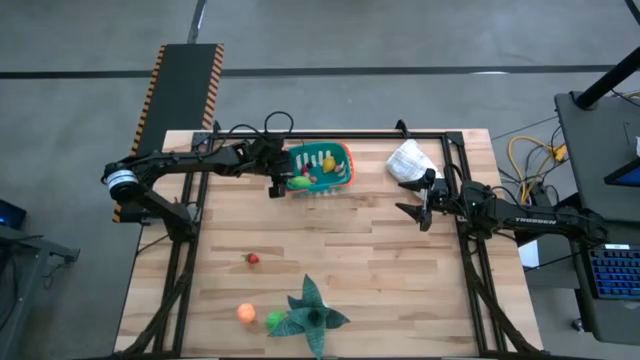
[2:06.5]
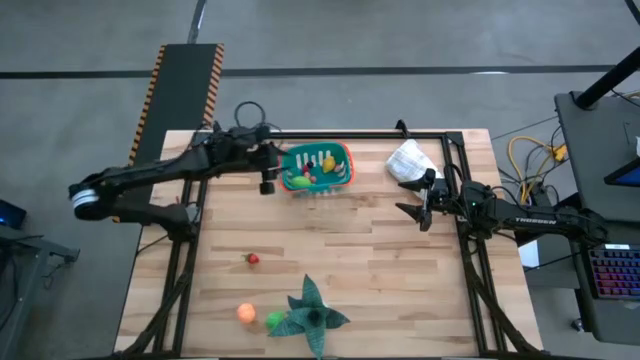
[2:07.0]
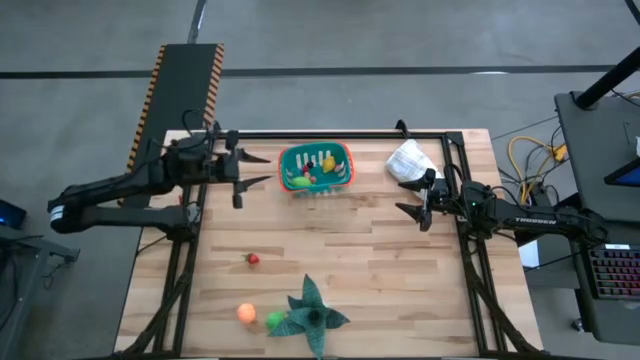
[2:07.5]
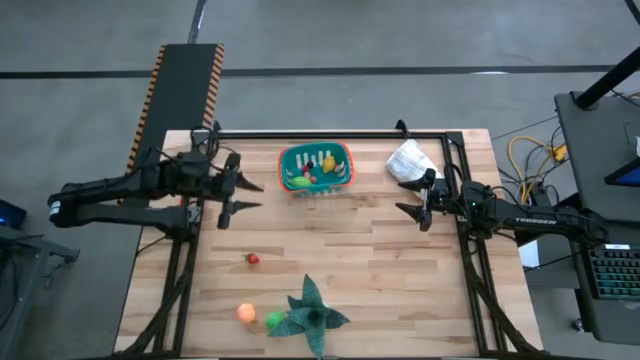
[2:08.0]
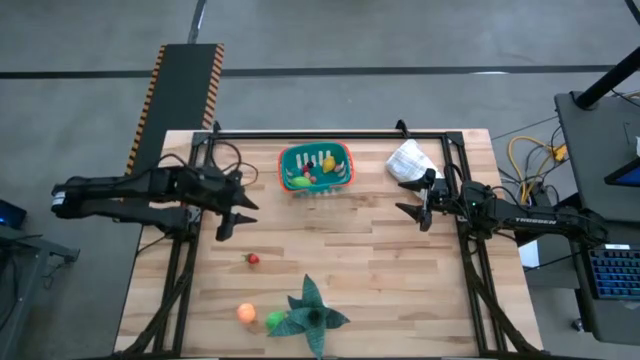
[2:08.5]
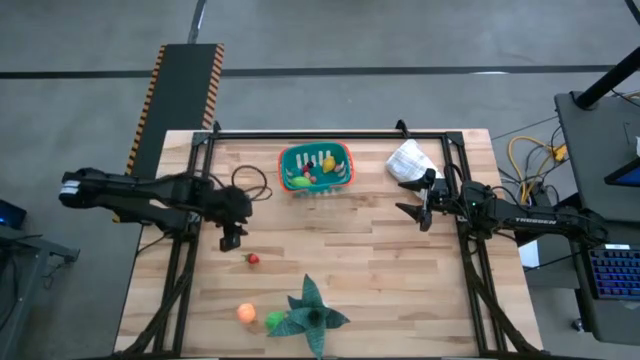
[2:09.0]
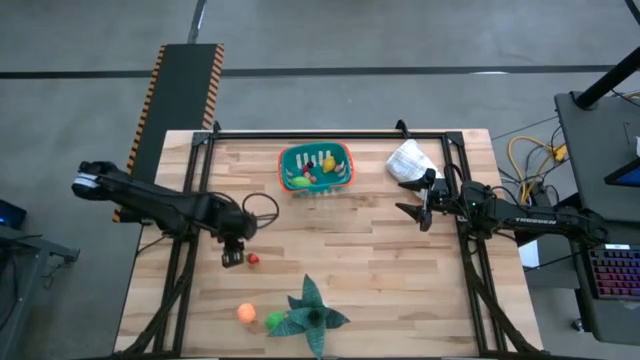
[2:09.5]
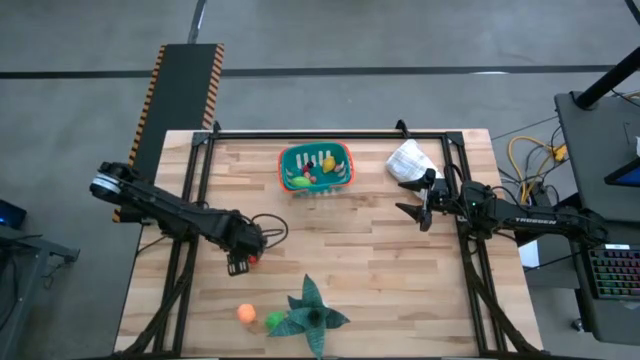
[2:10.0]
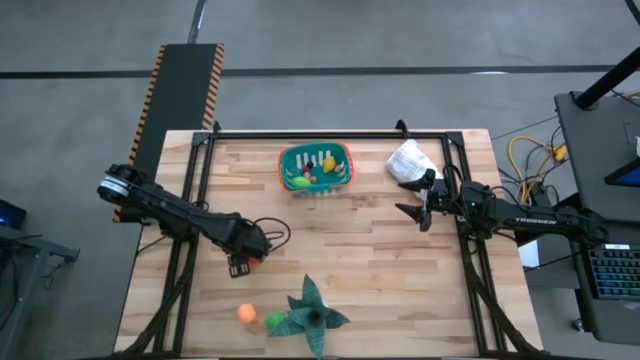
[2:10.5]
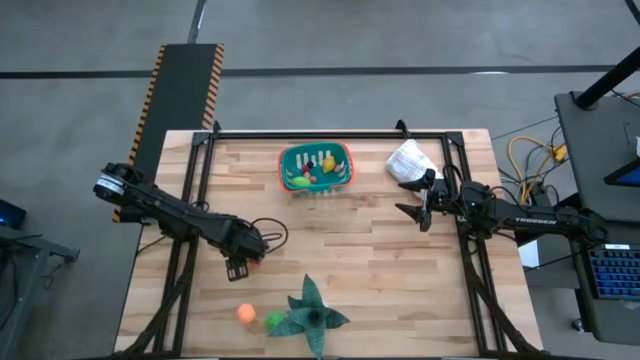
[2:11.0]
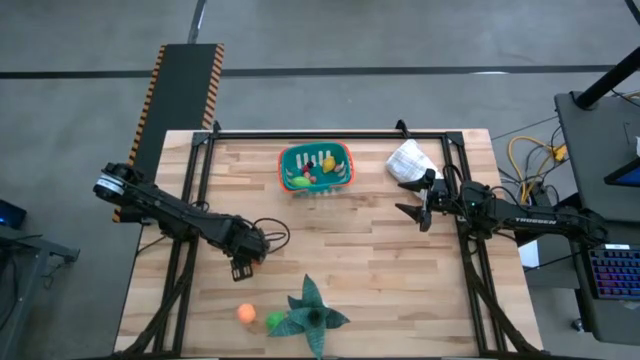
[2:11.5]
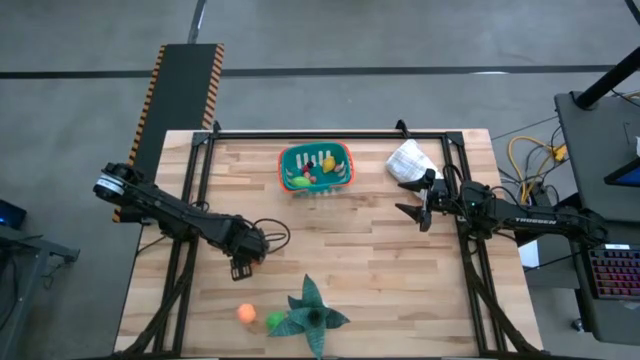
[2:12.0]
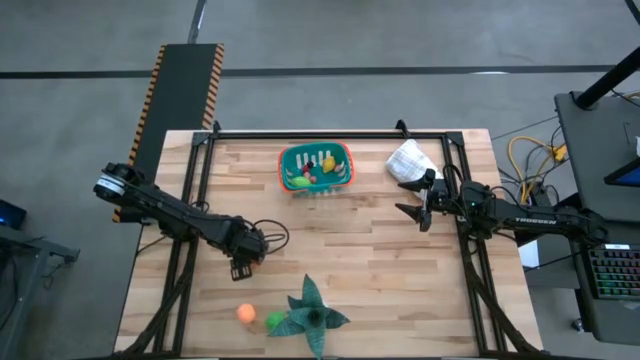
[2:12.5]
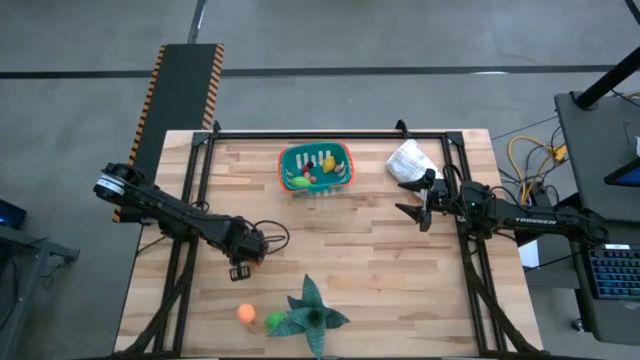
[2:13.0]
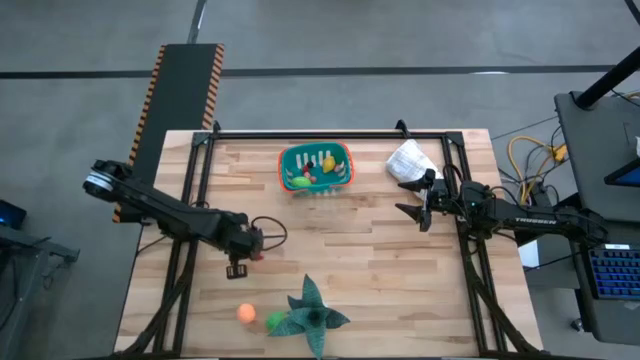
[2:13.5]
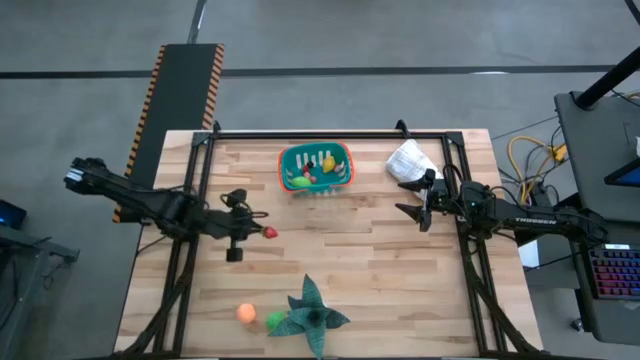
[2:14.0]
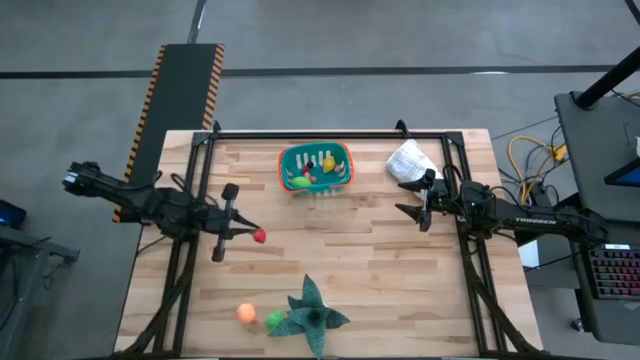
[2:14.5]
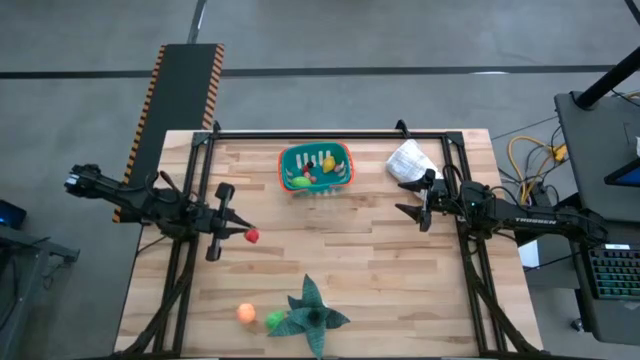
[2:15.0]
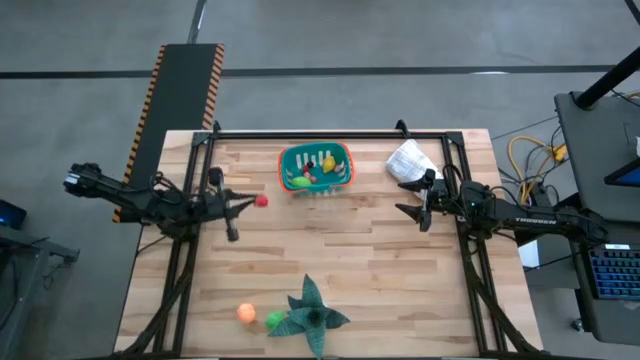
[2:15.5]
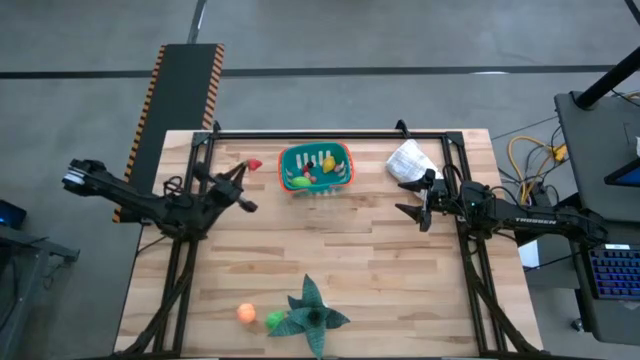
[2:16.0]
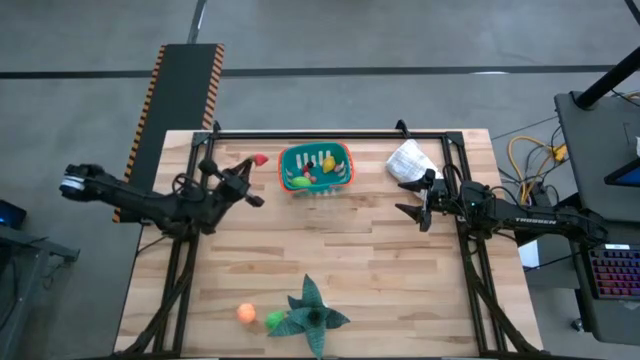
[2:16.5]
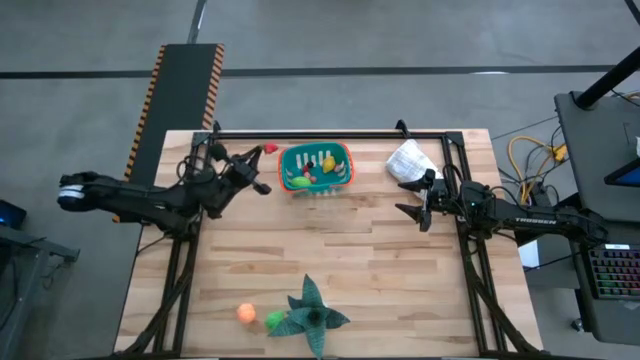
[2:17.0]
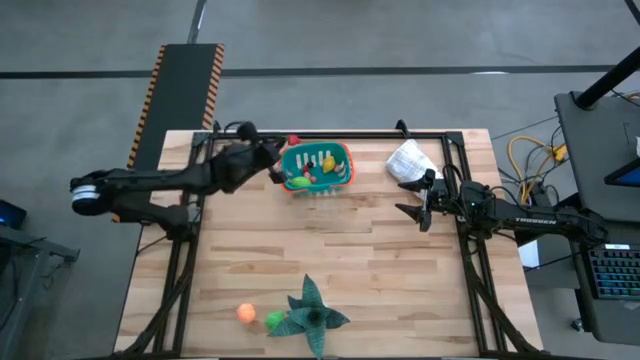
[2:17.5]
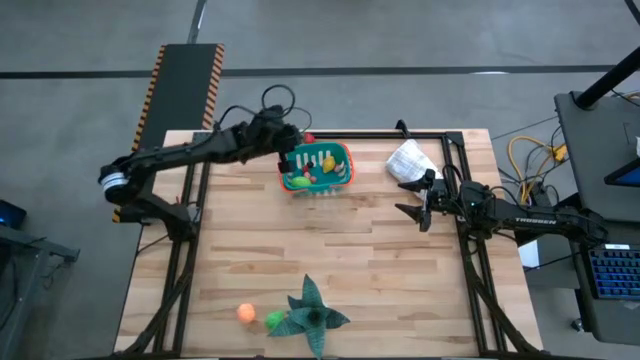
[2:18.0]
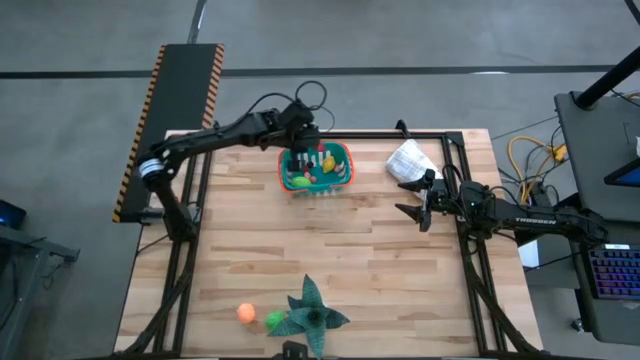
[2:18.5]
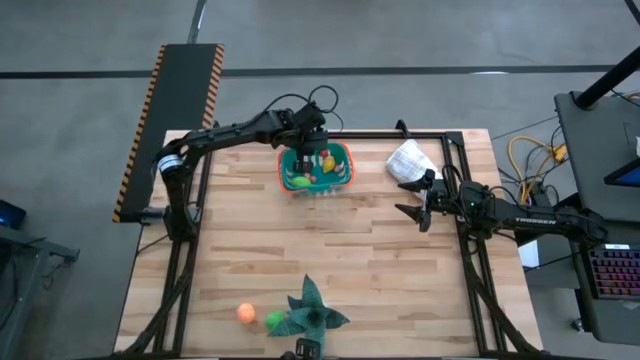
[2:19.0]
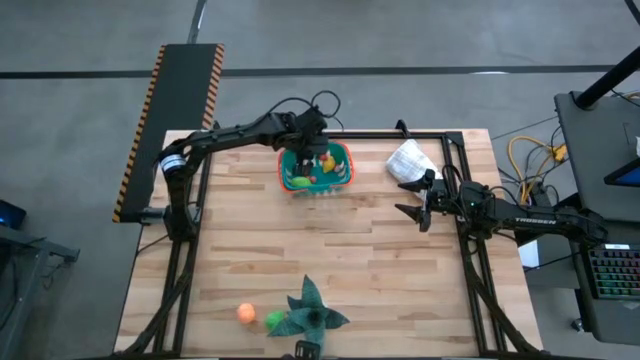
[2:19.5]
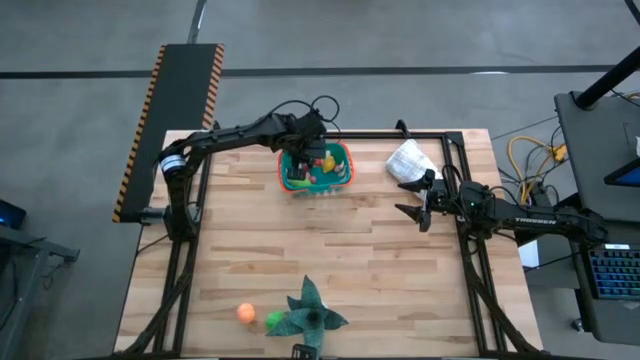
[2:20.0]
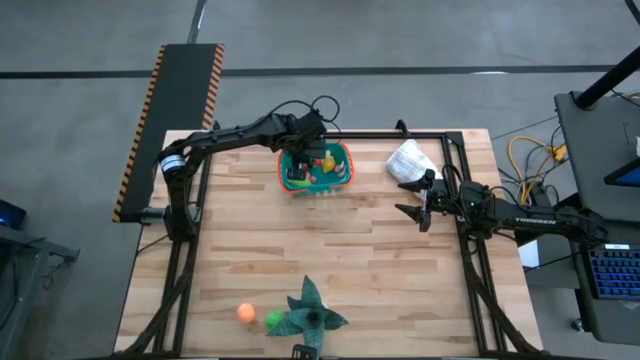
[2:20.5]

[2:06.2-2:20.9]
Task: Pick and placing Produce into tupperware
Put the strawberry toy into the bin

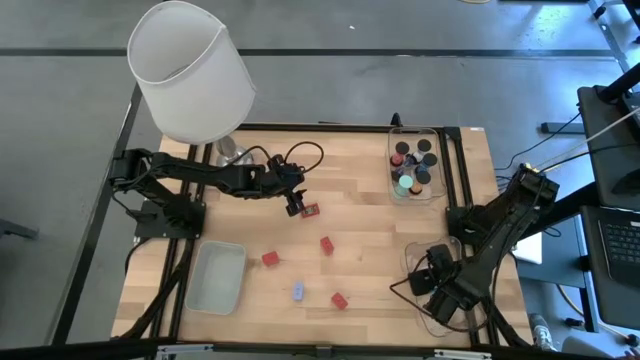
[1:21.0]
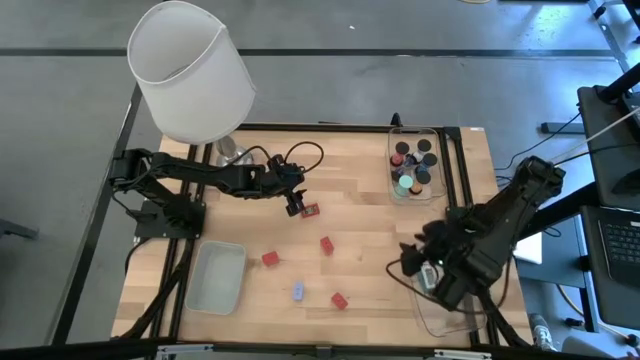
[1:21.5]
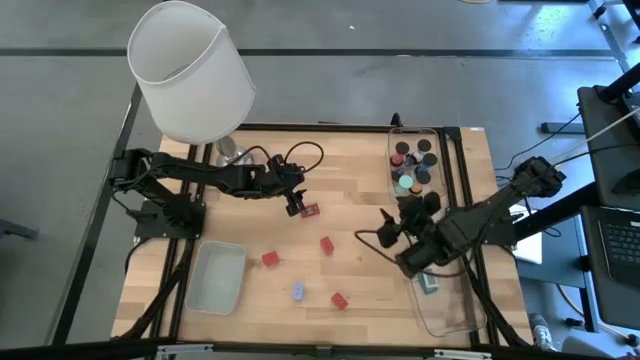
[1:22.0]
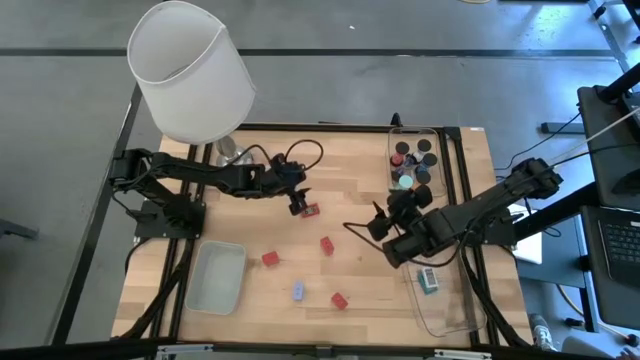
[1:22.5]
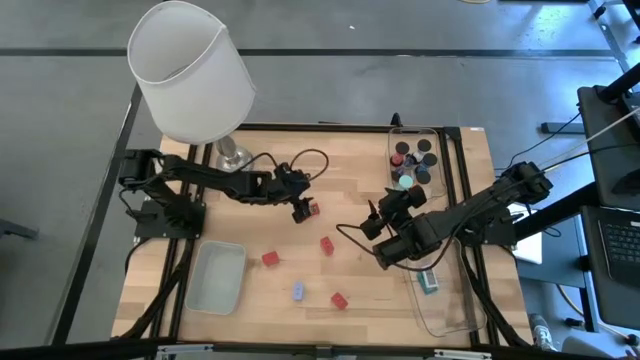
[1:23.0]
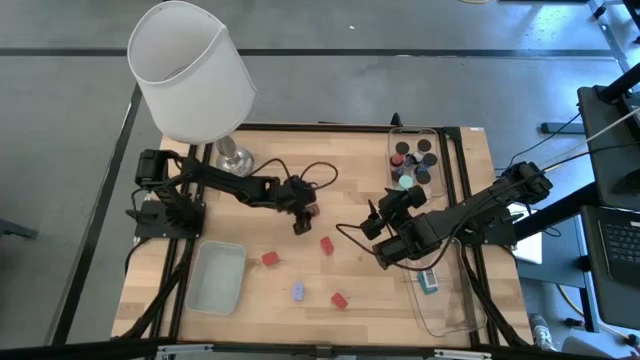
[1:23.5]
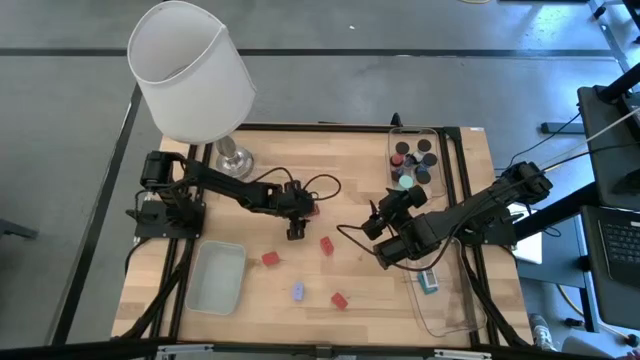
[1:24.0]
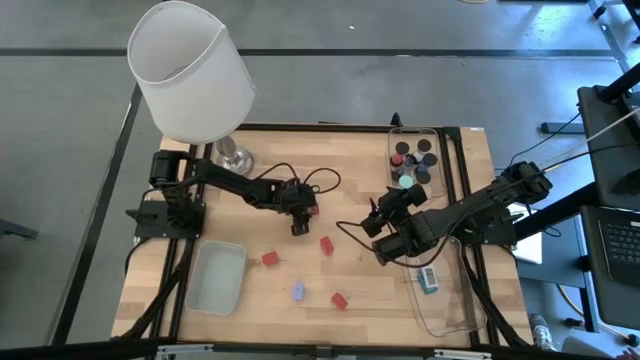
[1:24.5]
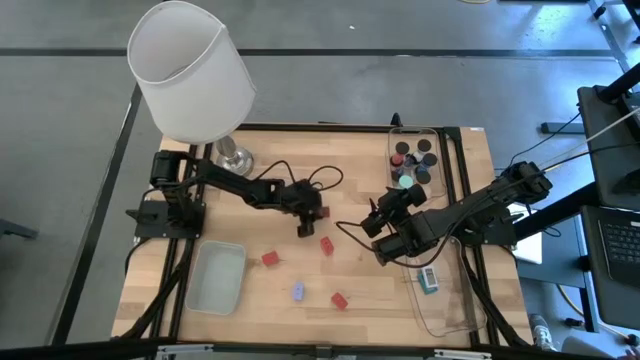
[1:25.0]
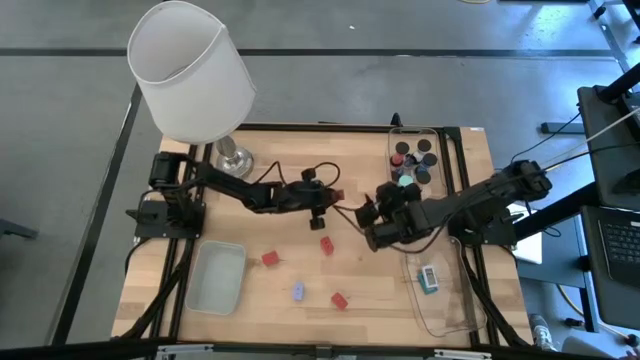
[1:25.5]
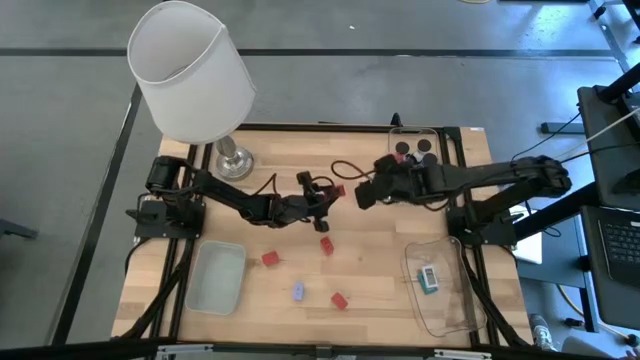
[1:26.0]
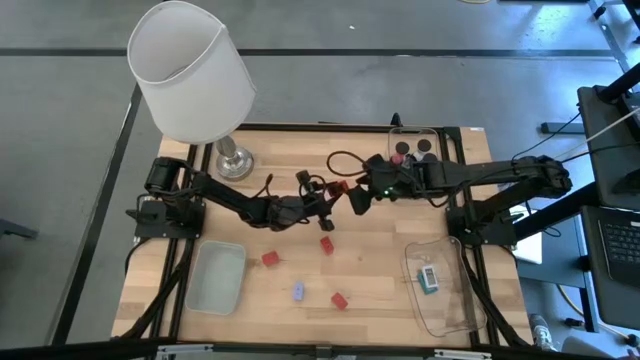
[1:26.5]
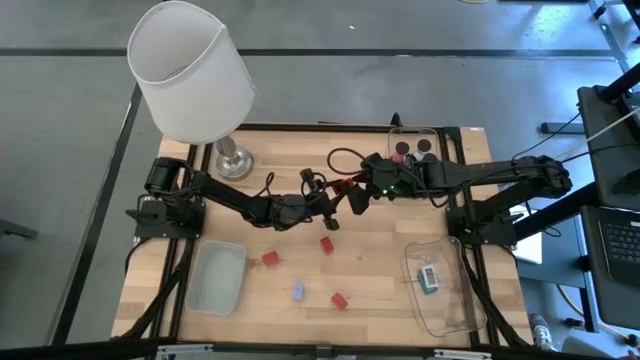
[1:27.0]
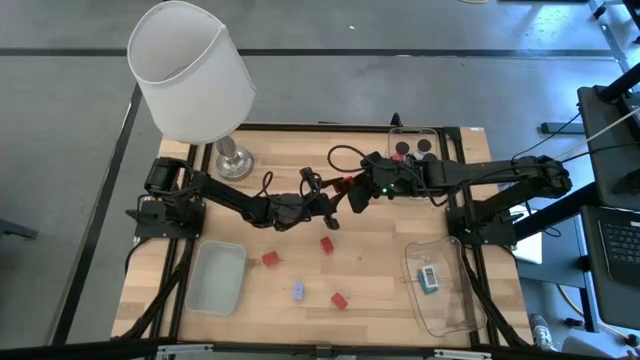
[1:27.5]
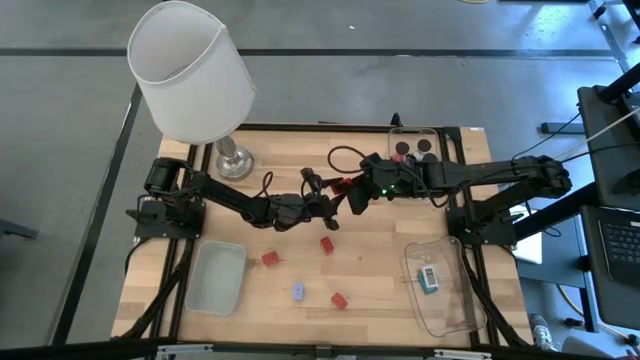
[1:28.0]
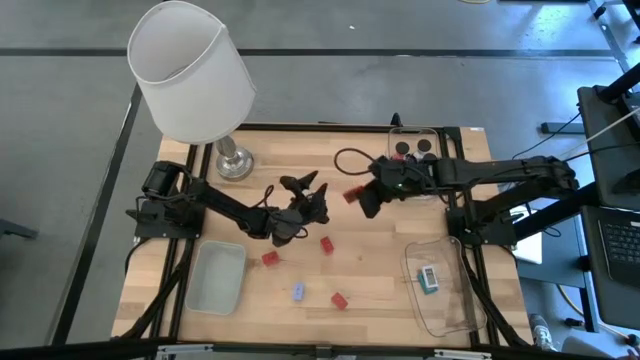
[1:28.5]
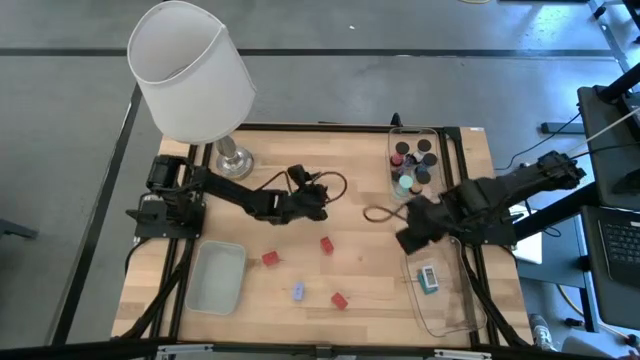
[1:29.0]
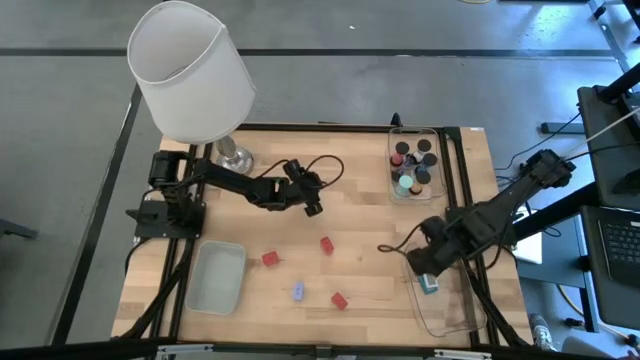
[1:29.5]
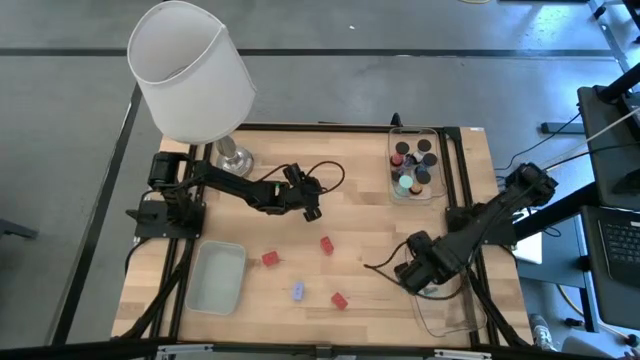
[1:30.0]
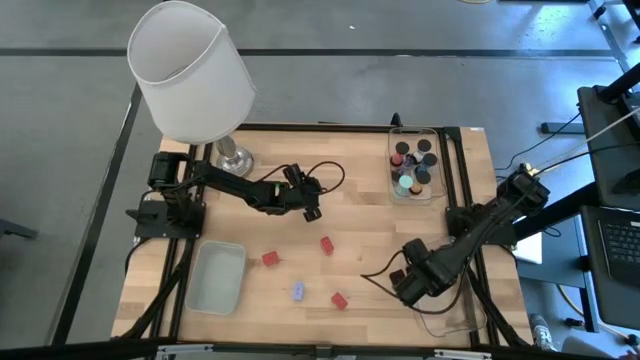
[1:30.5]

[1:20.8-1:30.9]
Task: Pick & Place Office items
Put the orange digital clock into the bottom transparent bin
